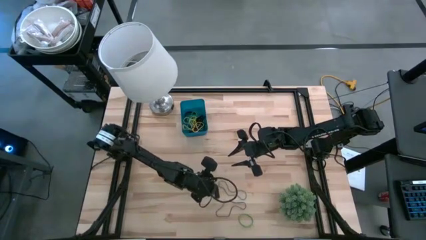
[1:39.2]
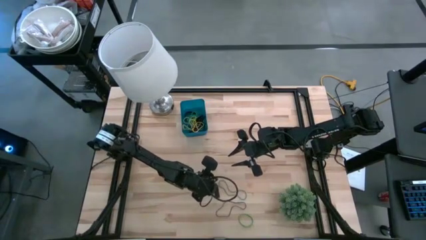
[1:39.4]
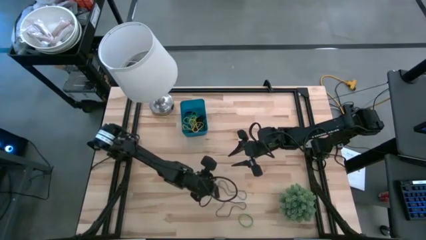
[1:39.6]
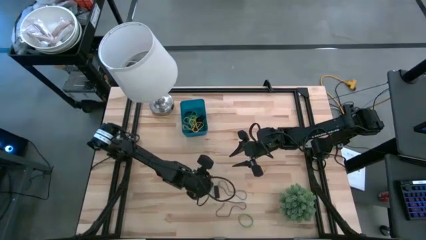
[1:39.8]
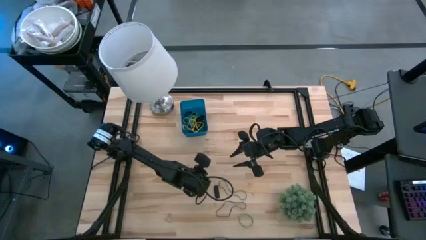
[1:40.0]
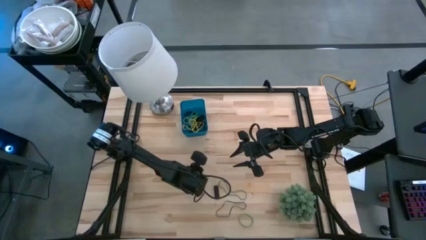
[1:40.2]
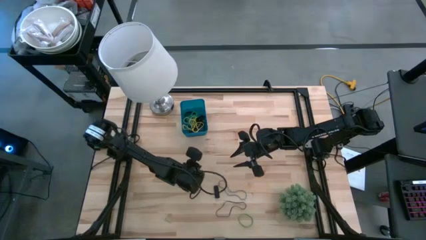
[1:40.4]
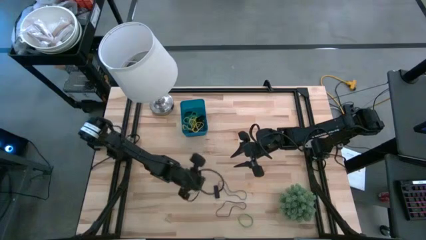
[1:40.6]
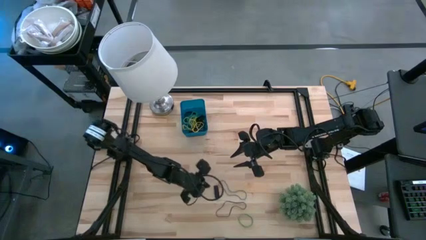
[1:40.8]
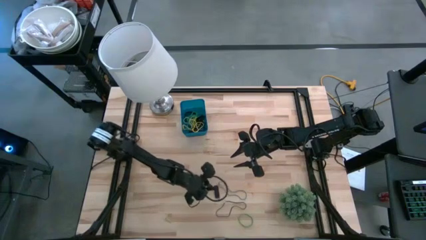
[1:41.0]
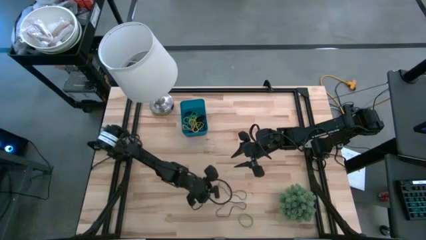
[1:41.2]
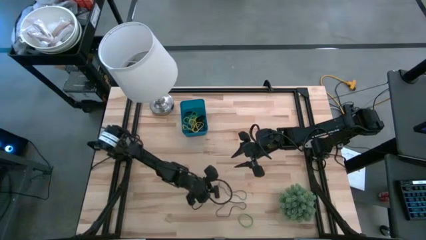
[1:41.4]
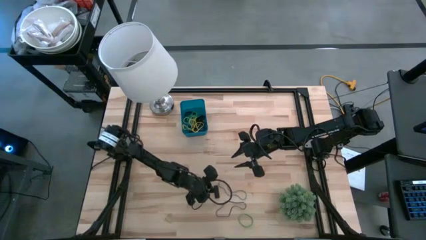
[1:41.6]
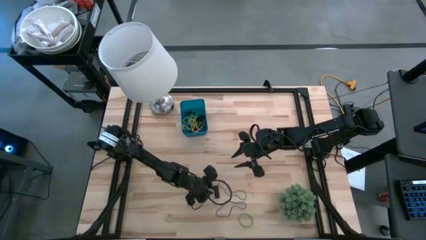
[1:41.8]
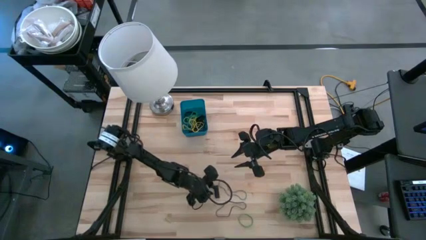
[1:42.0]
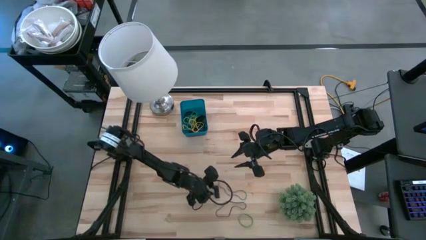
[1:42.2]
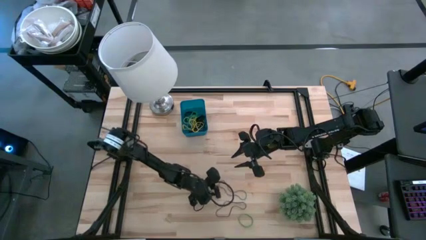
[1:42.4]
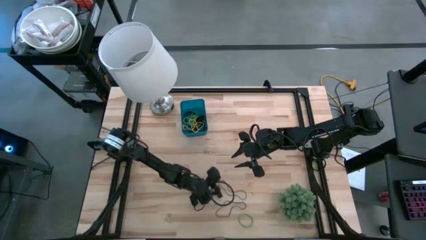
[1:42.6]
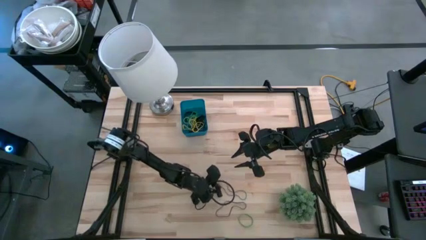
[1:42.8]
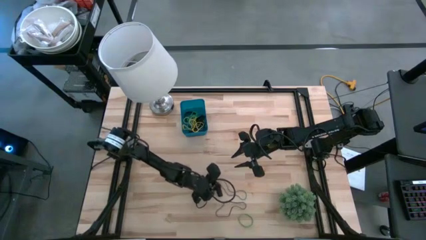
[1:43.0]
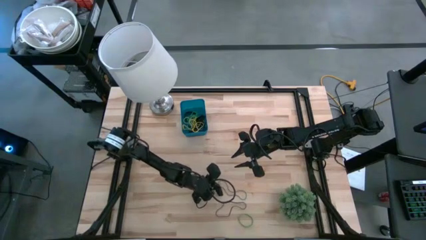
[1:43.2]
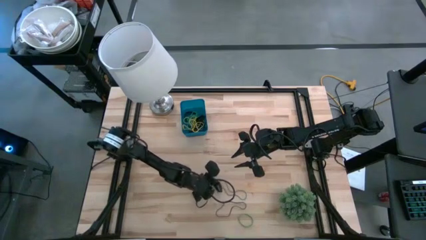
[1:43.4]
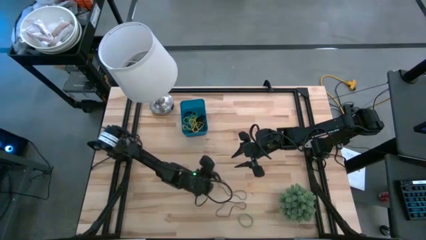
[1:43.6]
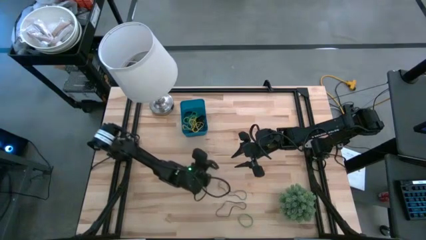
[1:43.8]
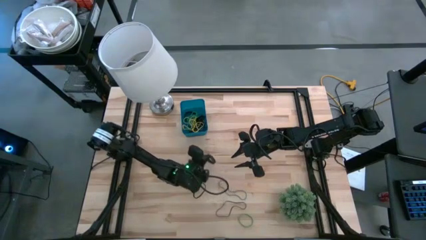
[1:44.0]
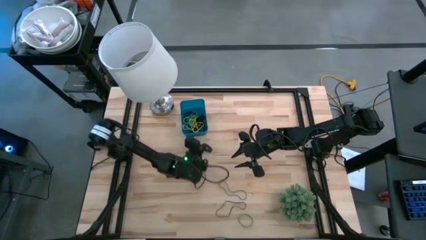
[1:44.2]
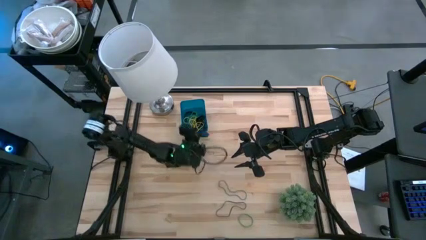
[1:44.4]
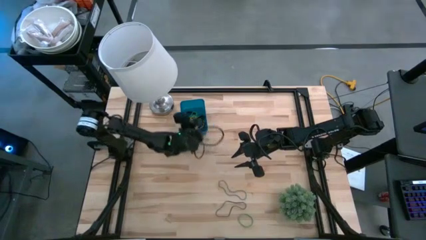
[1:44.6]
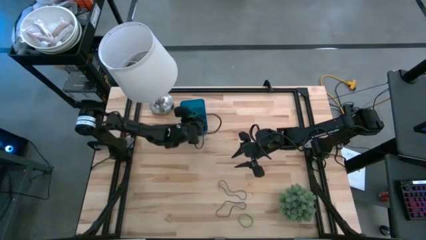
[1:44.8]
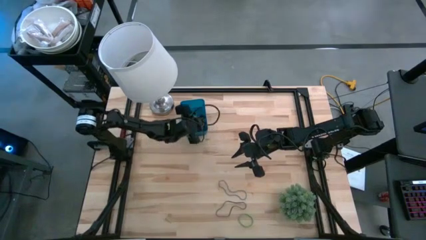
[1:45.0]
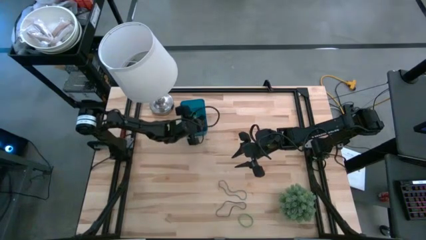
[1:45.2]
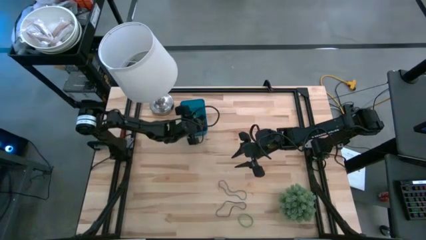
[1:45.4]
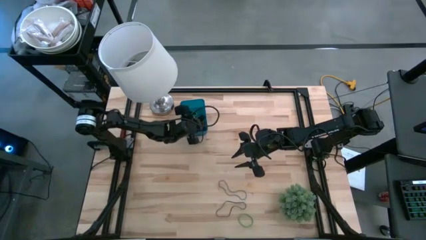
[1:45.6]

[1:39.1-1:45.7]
Task: Pick and place rubber bands into bin
Put the black rubber band into the blue bin

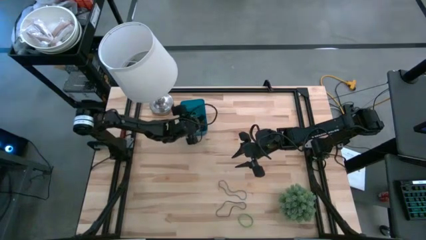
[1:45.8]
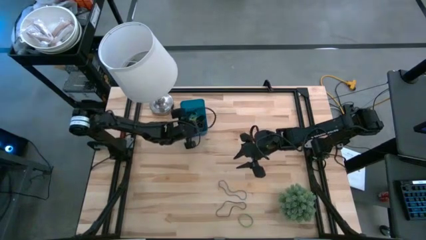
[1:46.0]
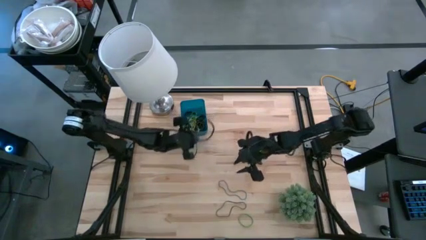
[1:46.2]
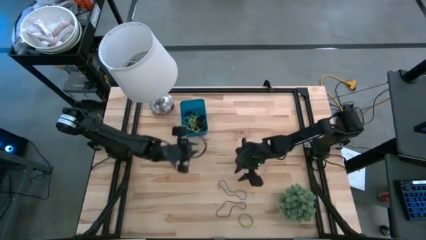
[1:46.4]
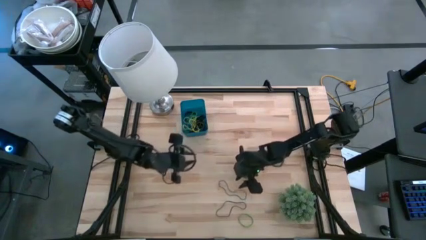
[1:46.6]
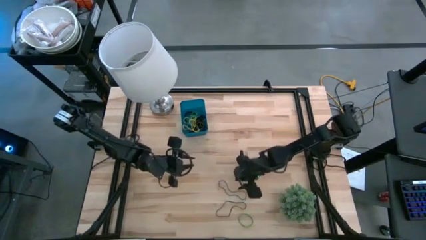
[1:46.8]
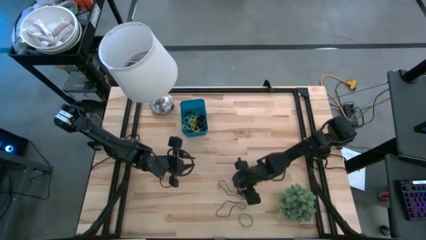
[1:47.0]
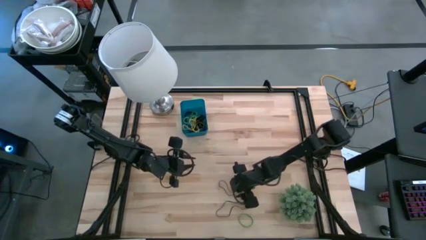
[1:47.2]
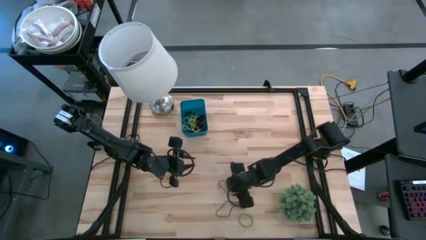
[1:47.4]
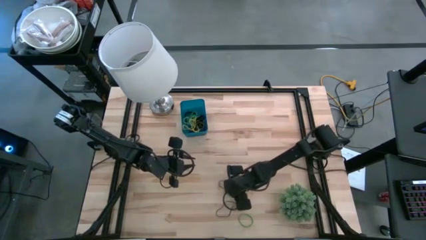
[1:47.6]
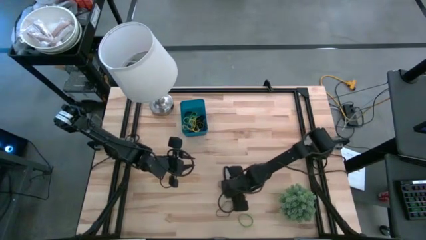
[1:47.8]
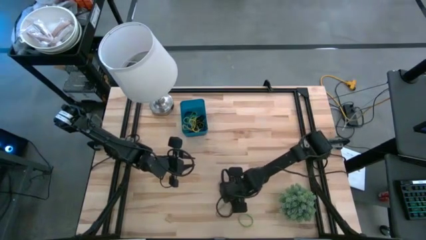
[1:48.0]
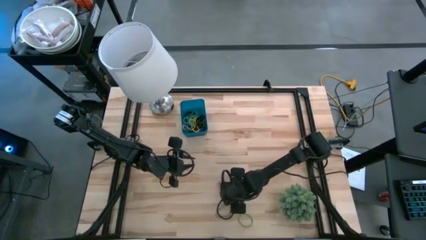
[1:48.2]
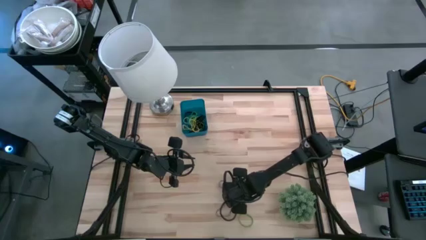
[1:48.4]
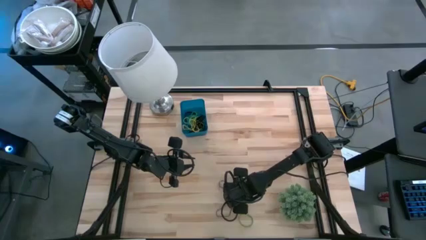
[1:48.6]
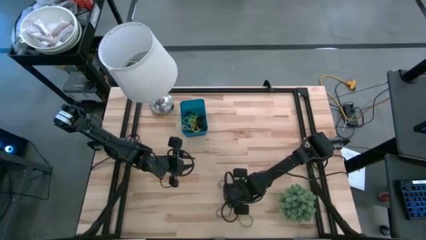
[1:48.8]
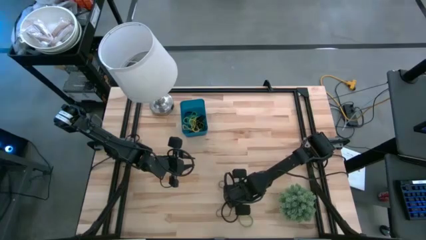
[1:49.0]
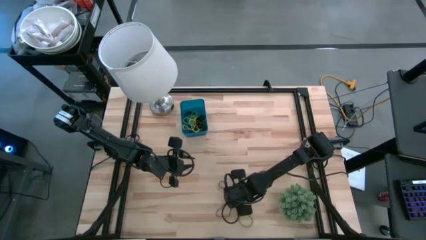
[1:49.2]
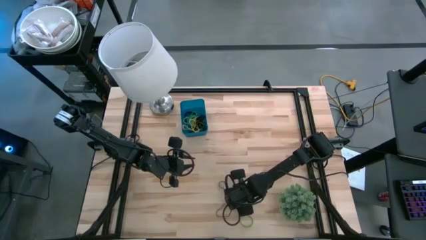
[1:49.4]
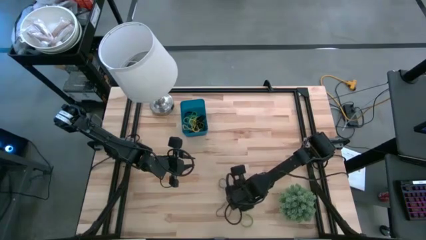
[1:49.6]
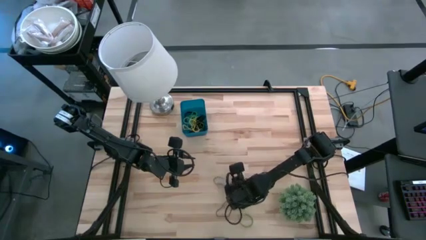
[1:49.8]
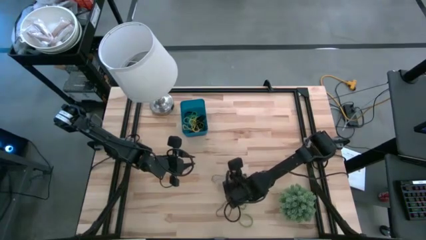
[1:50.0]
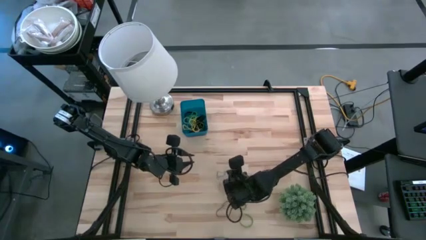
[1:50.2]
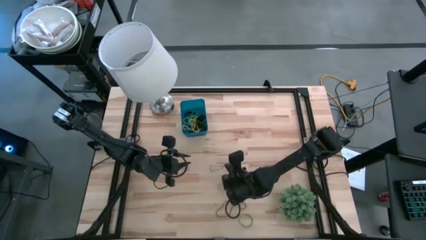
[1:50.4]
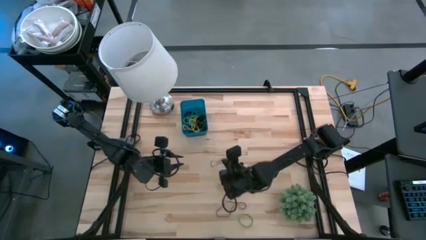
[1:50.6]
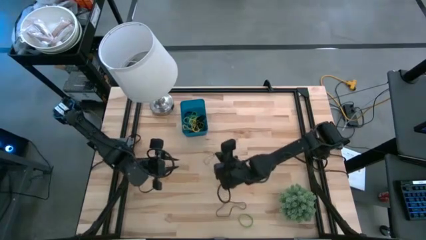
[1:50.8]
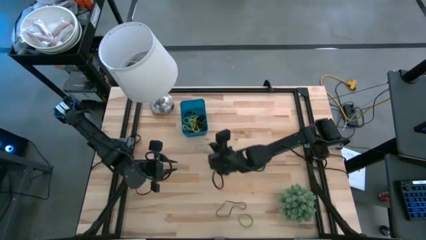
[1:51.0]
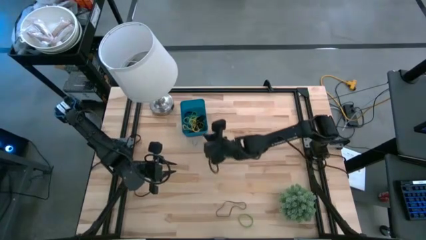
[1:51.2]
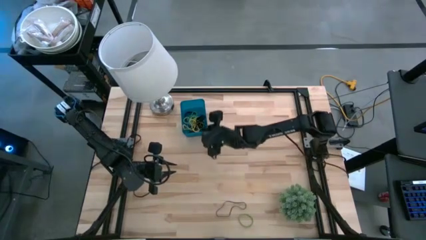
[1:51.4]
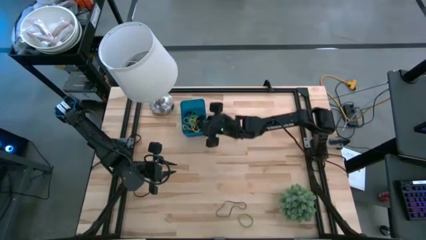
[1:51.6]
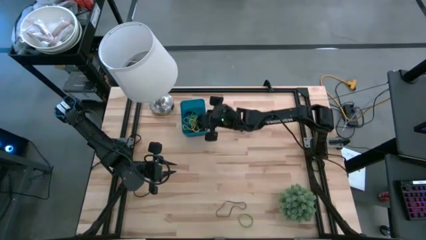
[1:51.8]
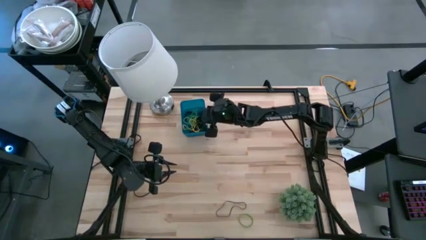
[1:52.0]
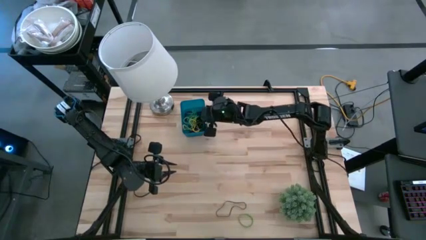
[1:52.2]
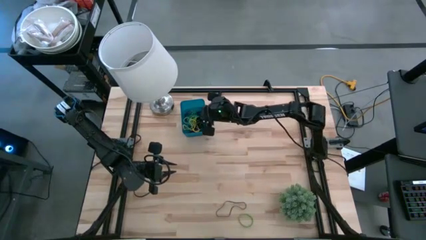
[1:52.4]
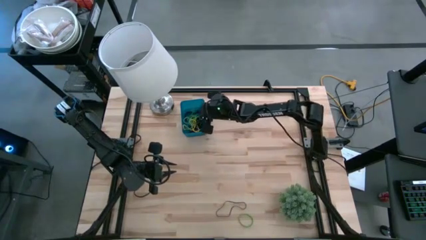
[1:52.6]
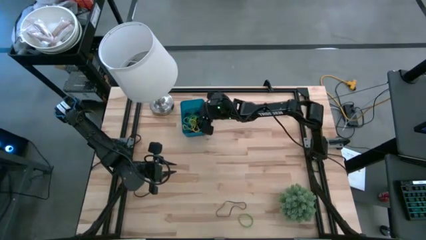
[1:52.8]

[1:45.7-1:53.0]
Put the blue rubber band into the blue bin

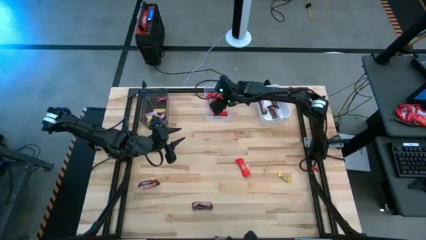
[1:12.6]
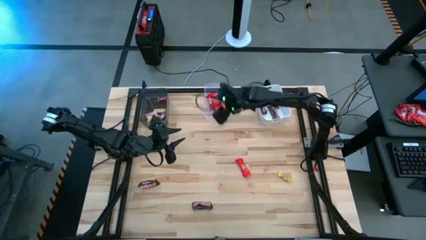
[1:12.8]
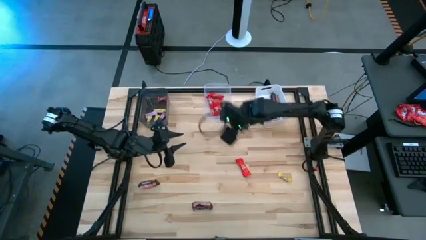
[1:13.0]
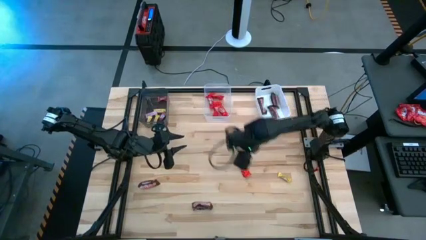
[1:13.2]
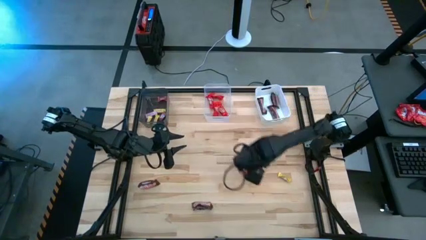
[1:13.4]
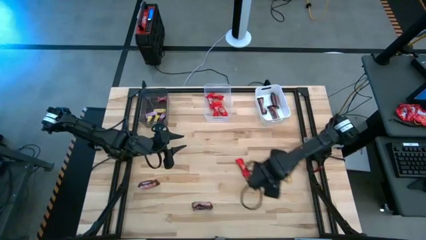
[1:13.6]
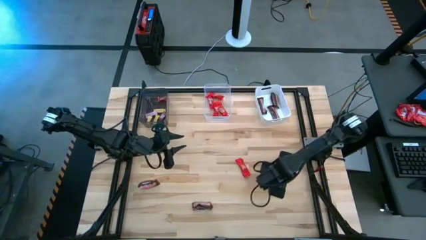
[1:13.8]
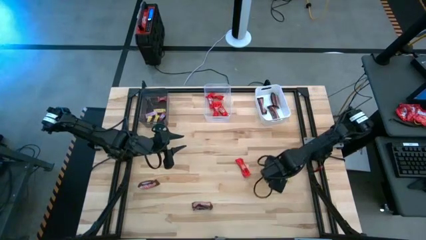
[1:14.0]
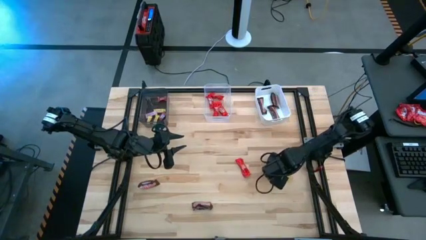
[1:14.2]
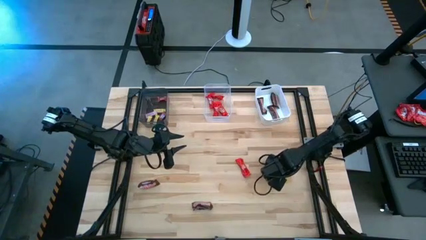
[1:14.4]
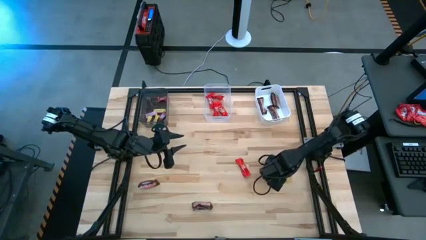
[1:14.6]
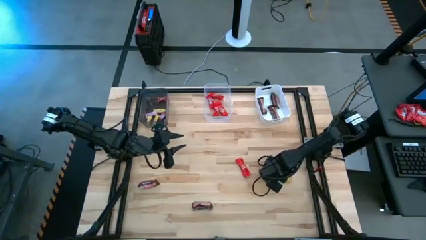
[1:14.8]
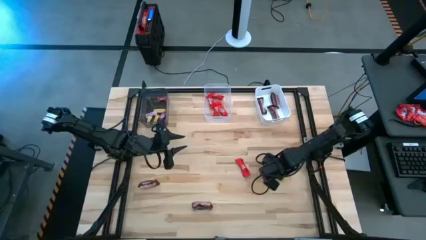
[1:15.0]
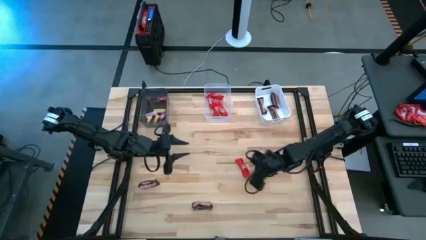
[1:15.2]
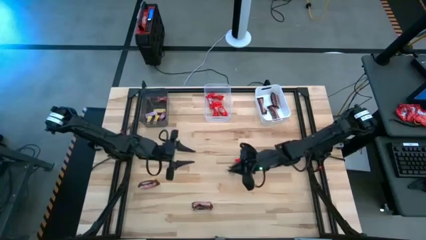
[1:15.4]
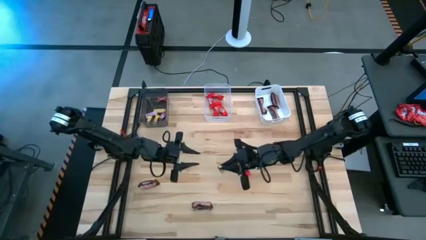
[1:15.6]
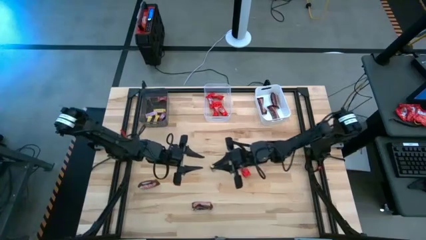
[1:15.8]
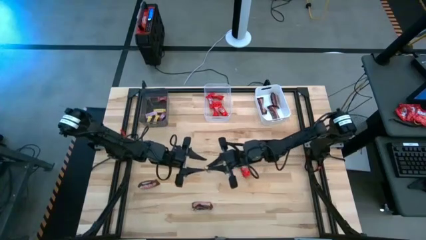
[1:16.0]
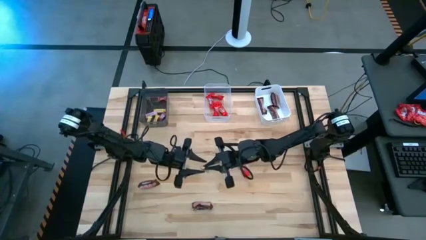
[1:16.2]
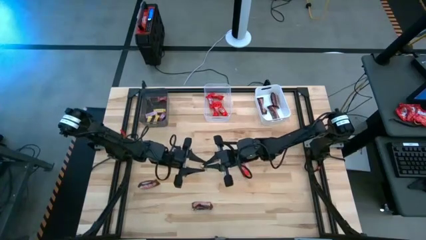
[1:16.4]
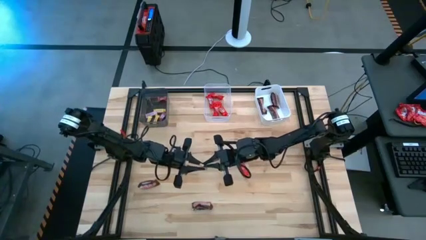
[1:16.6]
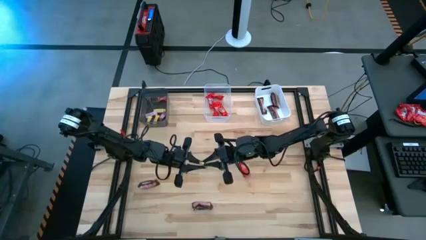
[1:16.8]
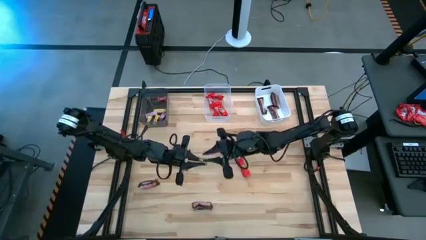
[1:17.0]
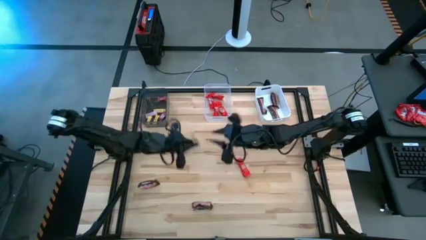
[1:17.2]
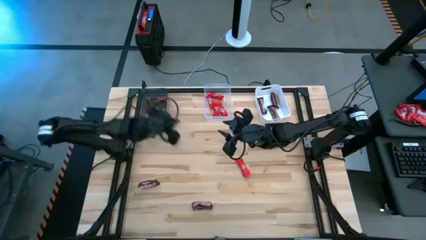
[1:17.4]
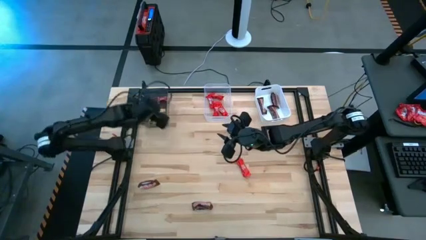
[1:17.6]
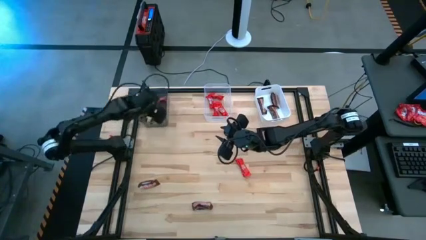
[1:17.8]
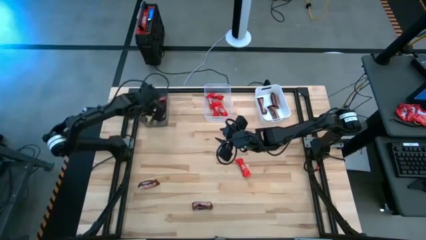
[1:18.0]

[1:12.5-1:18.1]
Task: Sort candy by brand, put in halloween buckets
Put the yellow candy into the black bin
